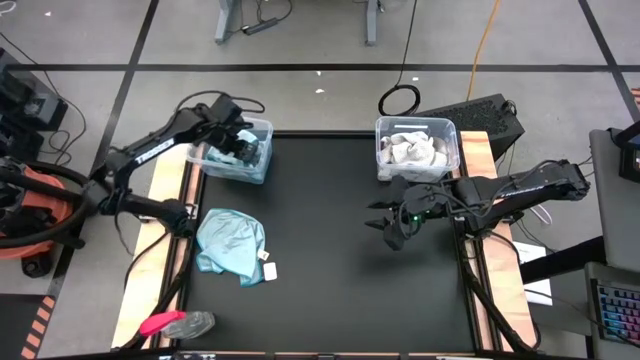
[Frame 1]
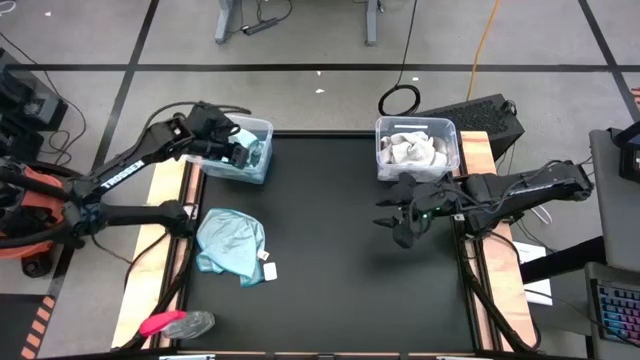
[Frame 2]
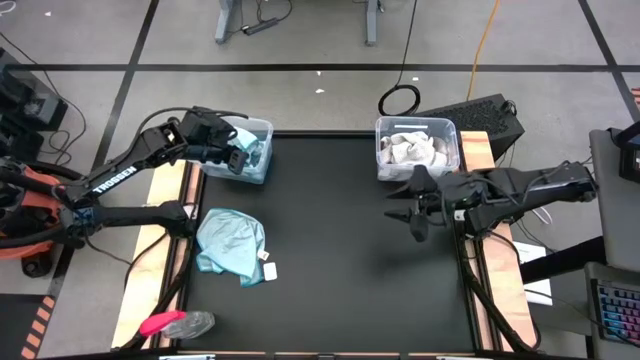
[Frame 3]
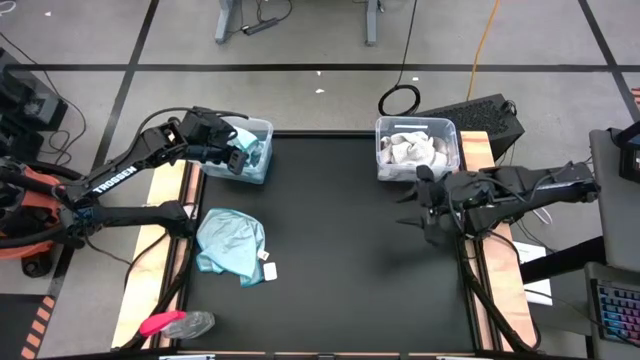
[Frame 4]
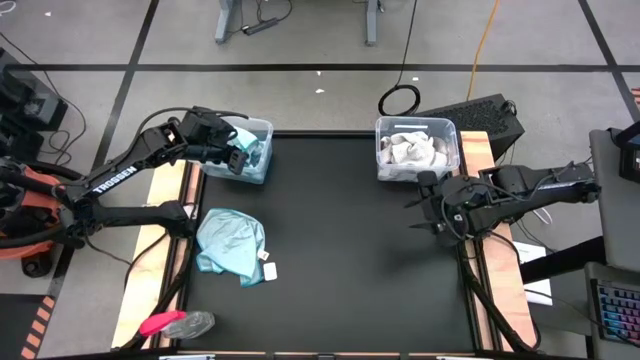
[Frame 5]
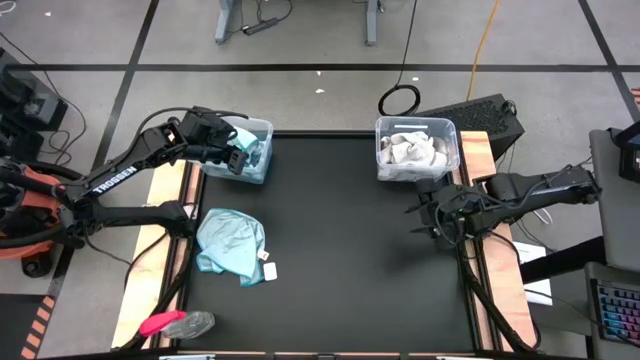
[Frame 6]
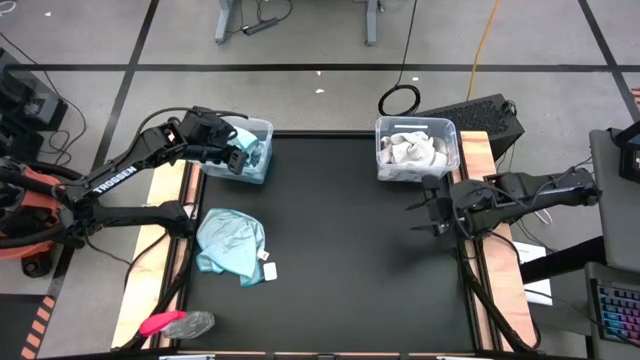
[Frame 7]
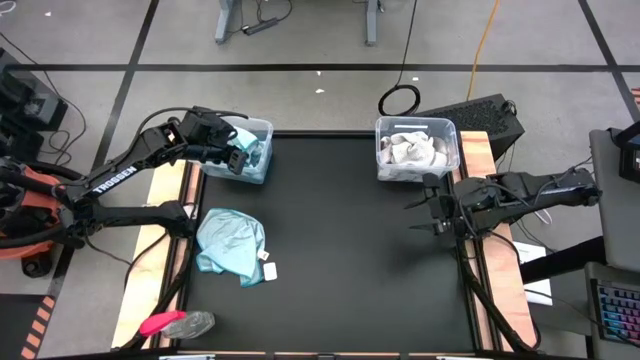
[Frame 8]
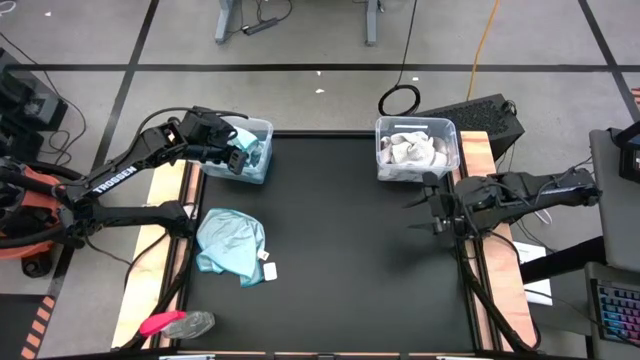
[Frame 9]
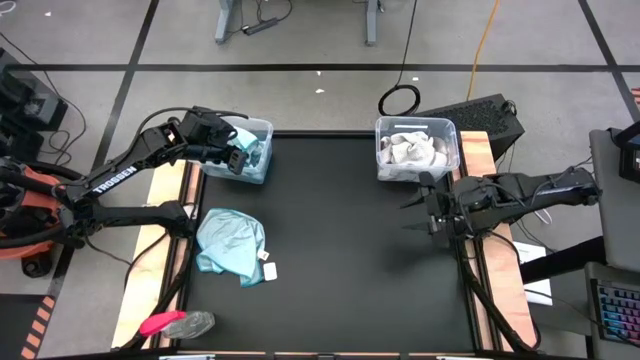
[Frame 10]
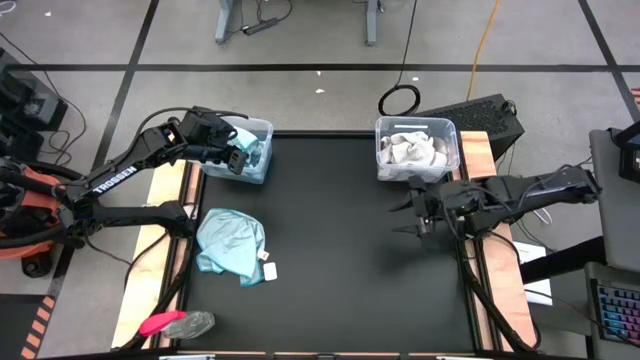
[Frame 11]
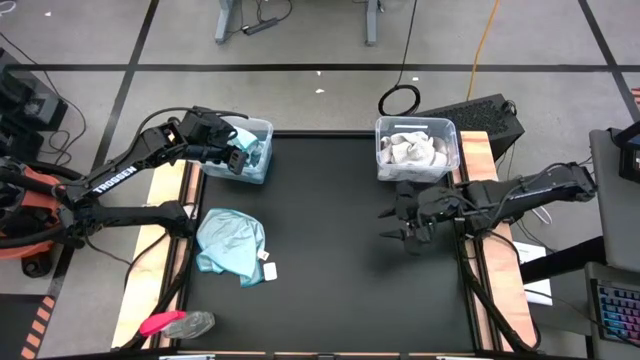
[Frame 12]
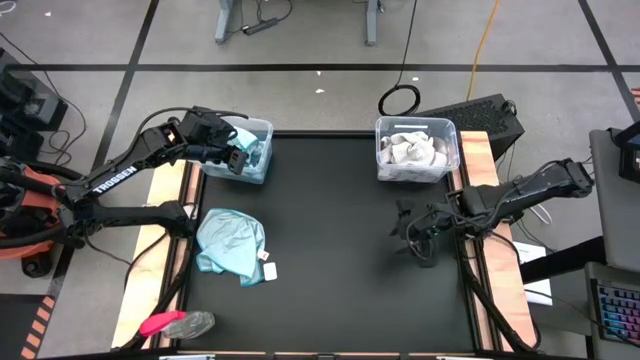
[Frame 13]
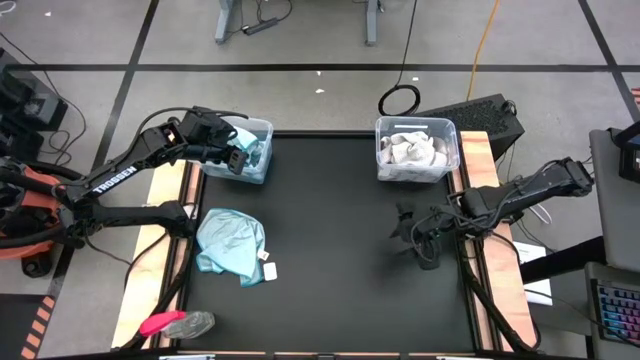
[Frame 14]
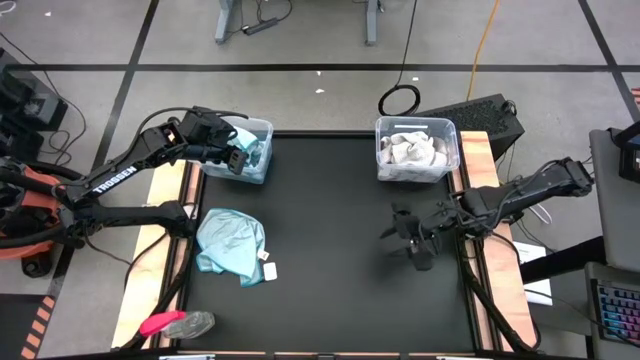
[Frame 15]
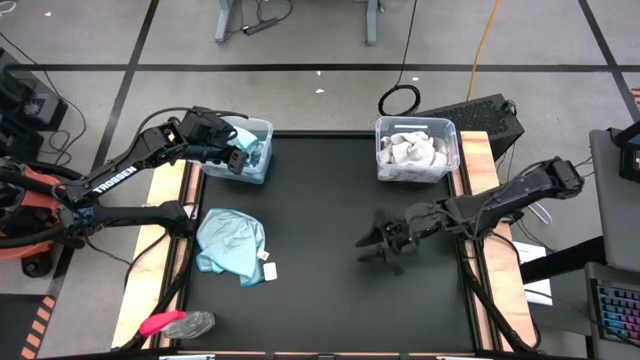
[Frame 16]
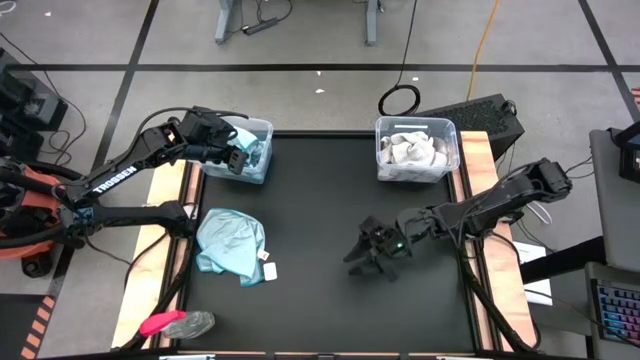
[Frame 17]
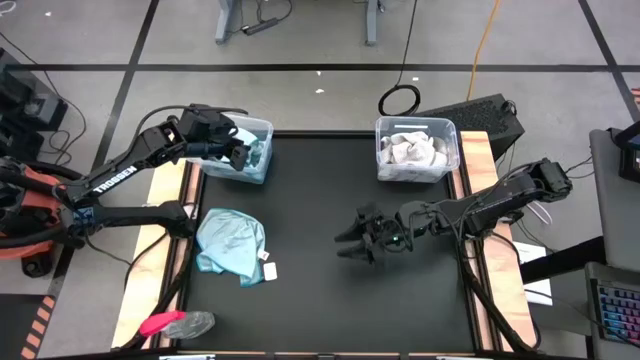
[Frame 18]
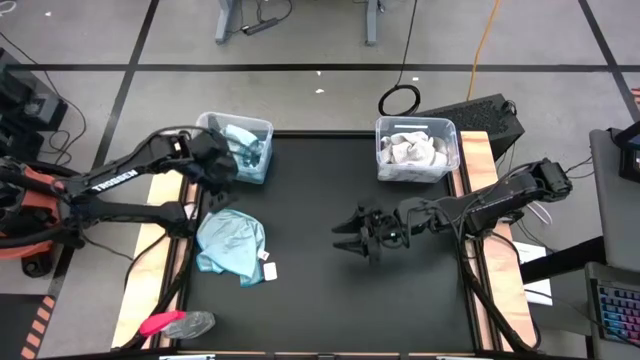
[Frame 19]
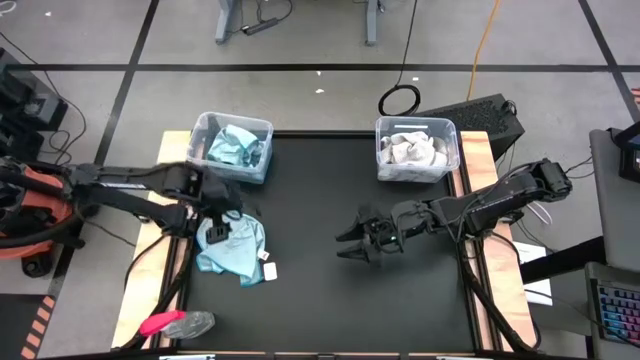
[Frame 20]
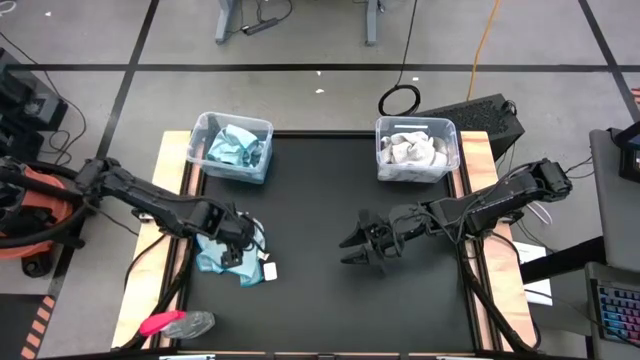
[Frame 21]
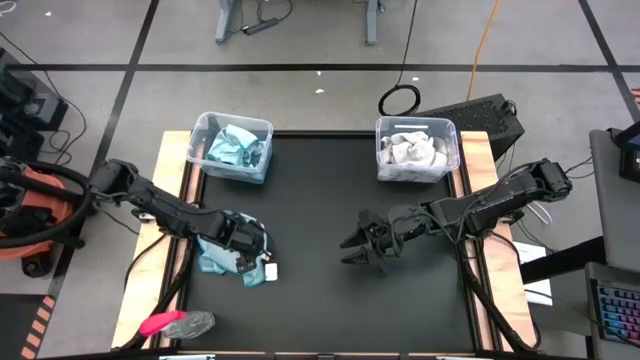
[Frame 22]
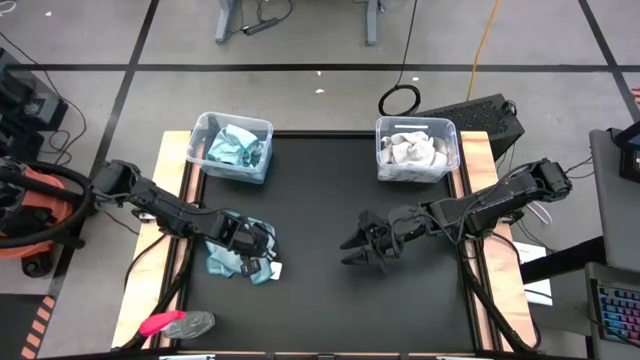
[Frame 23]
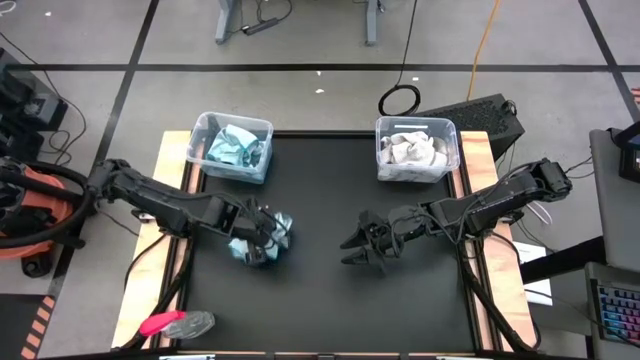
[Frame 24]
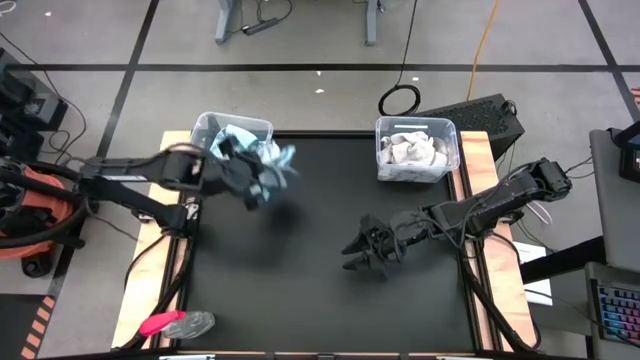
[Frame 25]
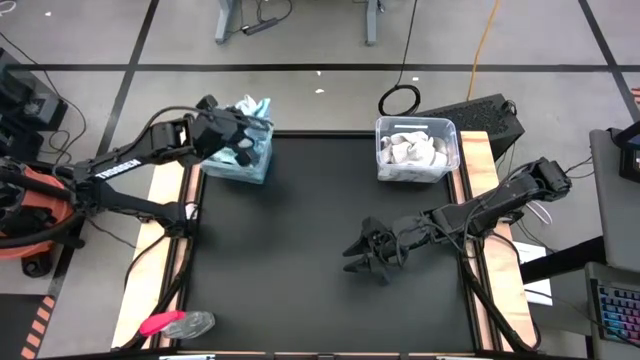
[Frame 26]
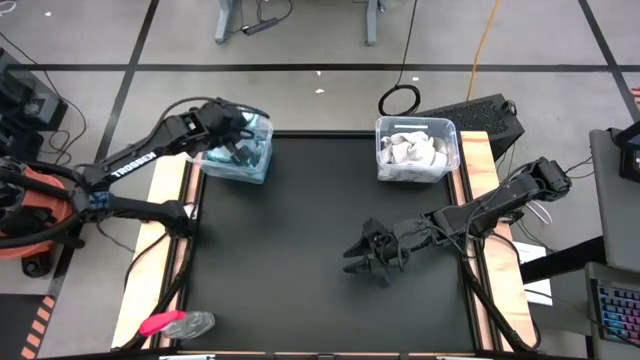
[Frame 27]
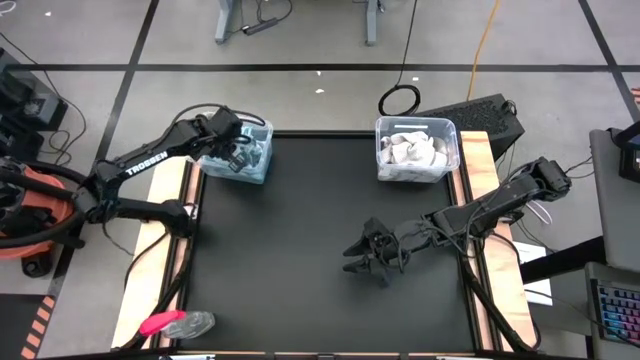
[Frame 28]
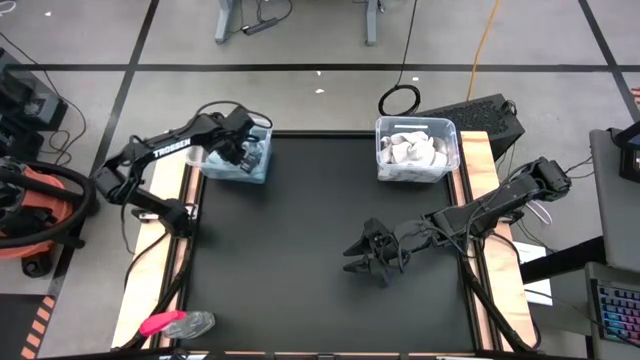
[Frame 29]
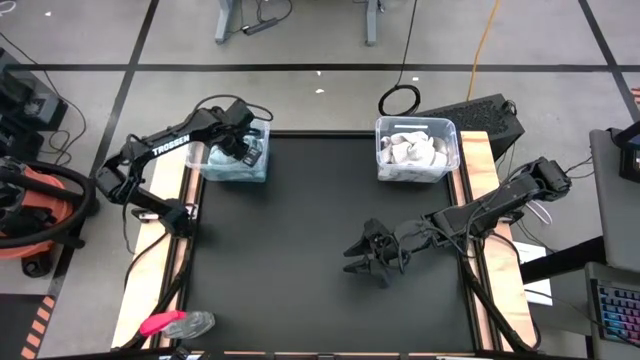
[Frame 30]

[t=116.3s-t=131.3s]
Task: Sort microfiber towel by color & place in baskets
Put the blue microfiber towel into the left transparent bin

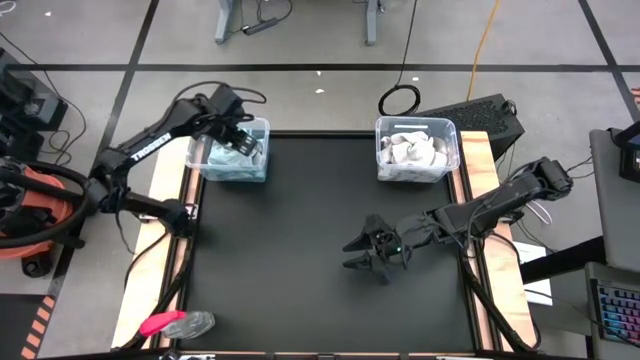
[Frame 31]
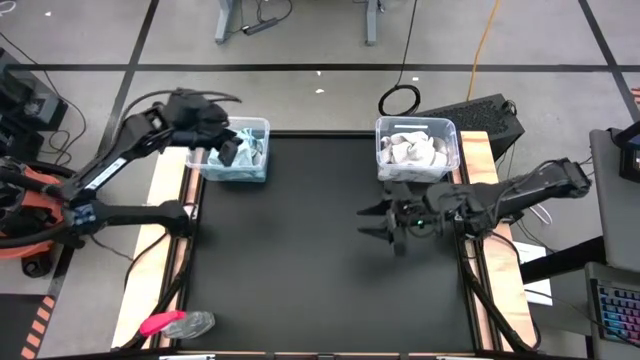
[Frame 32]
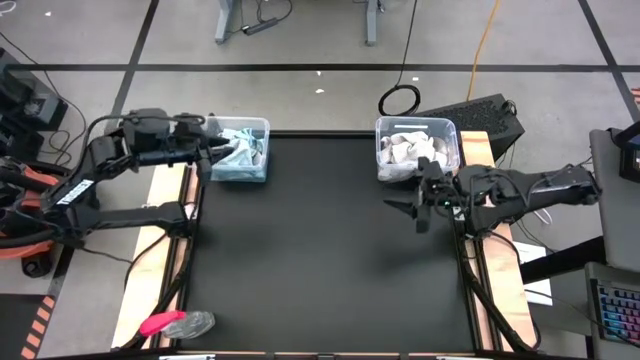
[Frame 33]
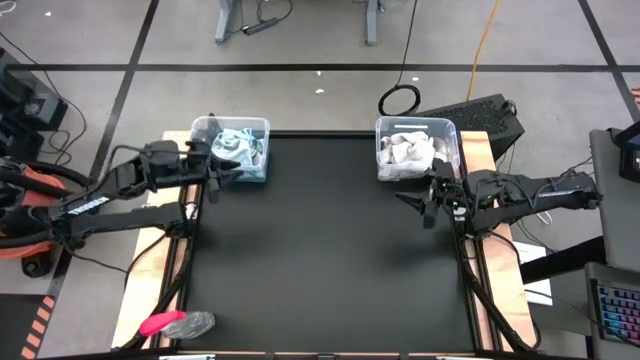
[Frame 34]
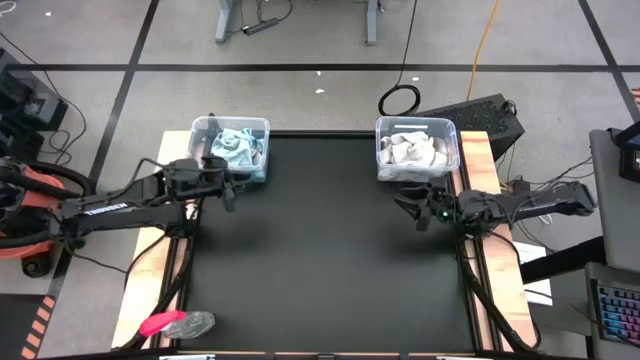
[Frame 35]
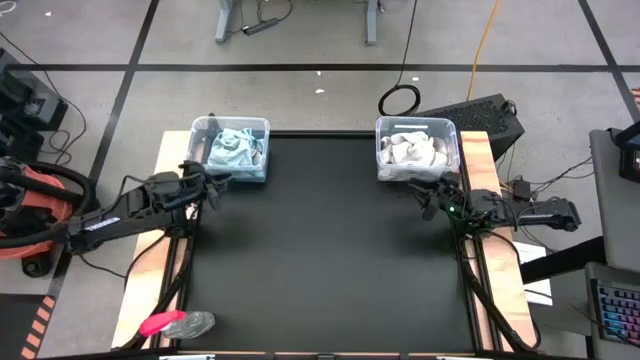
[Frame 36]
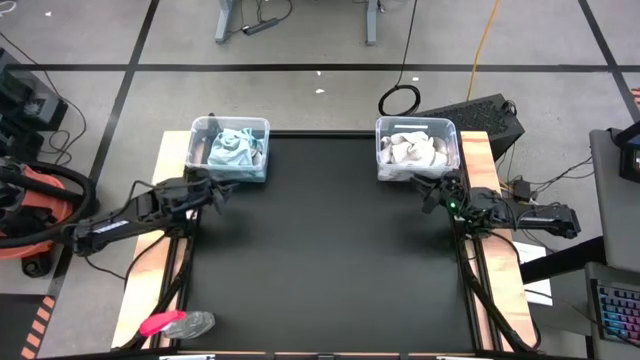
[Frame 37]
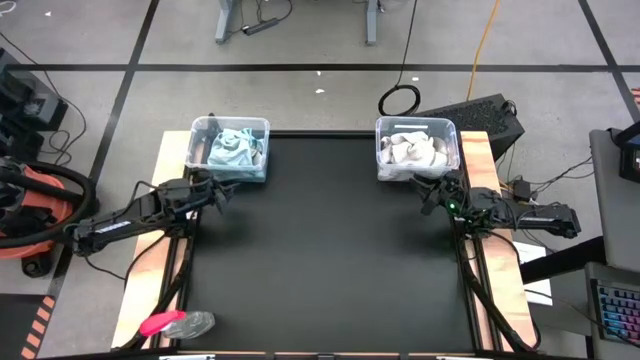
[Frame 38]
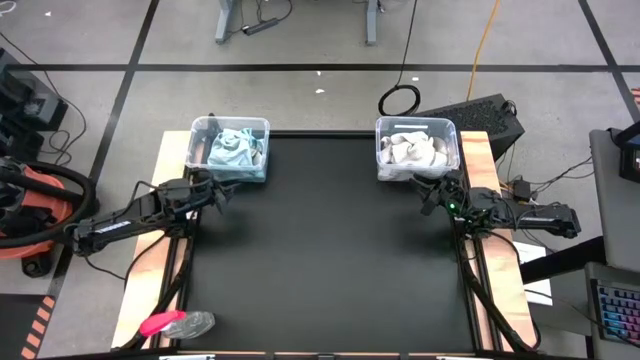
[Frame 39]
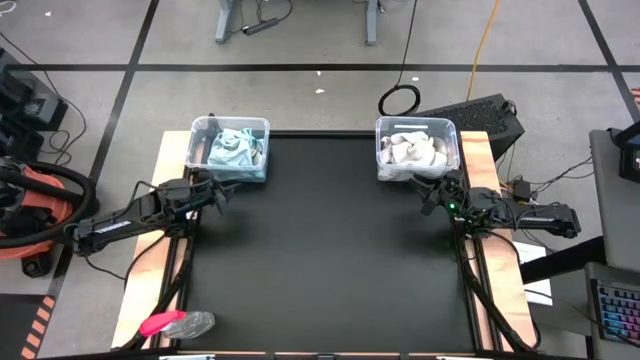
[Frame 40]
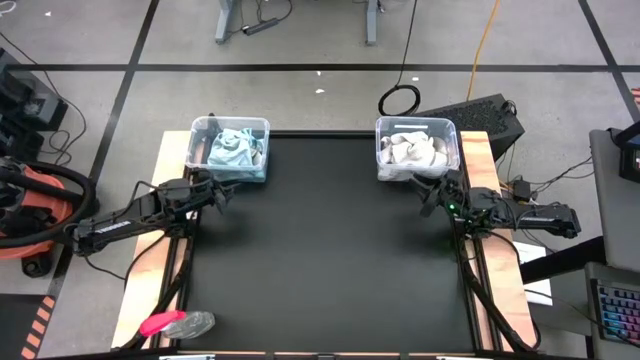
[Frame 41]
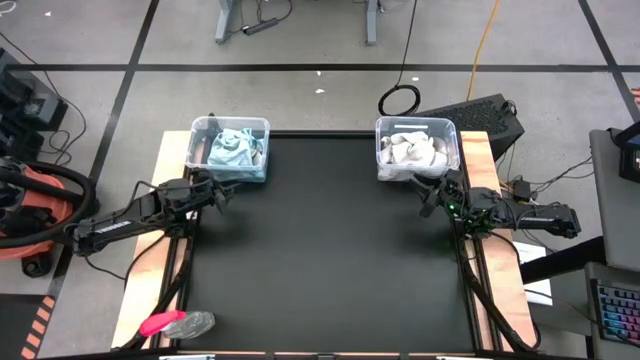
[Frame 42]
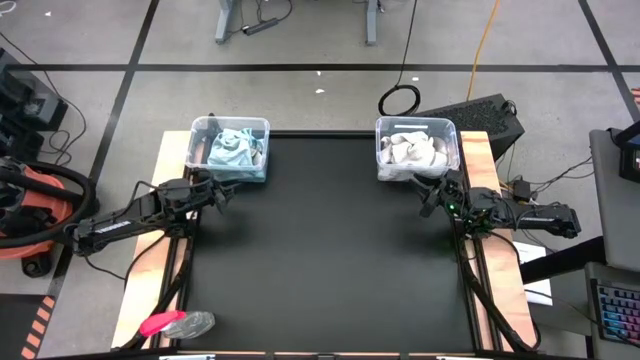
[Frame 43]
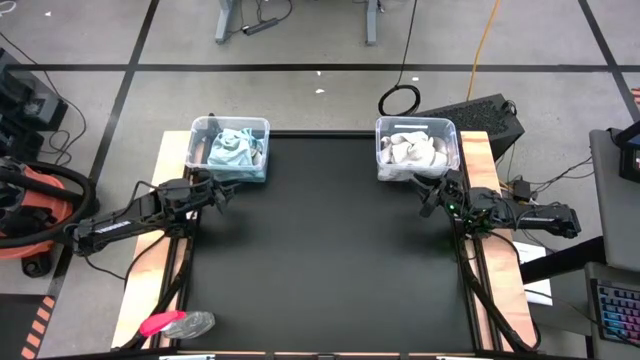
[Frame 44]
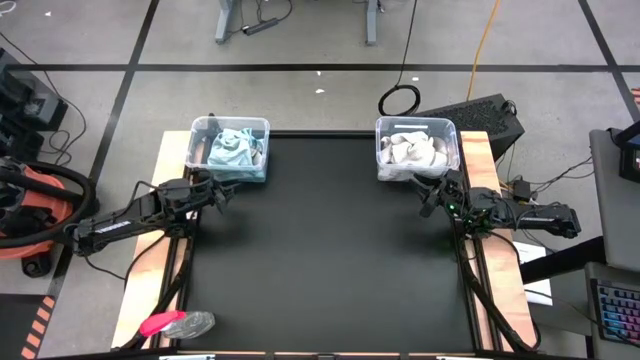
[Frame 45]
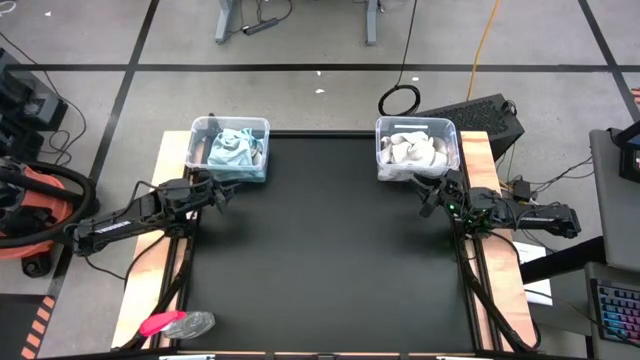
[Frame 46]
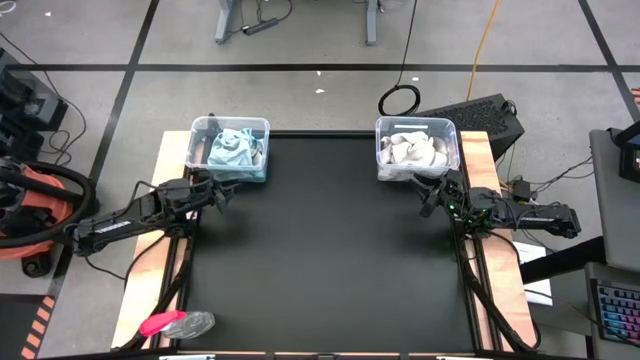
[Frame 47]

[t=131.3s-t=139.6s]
Return to Home Position
